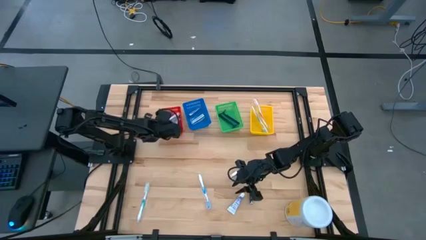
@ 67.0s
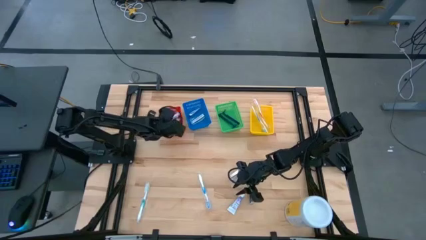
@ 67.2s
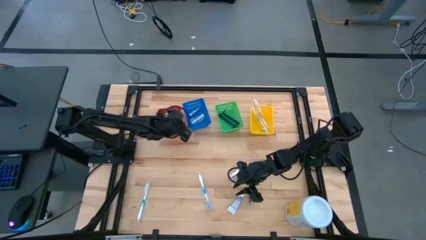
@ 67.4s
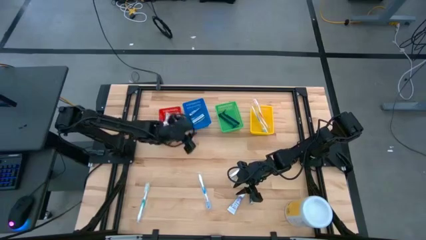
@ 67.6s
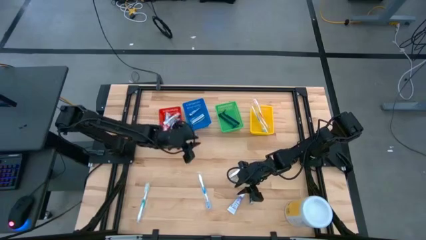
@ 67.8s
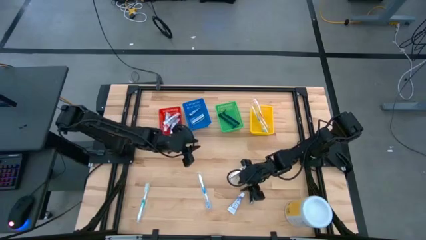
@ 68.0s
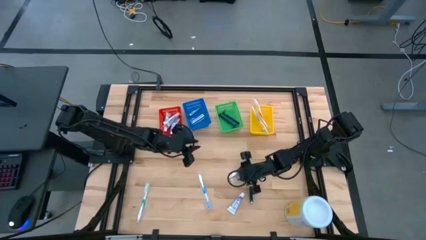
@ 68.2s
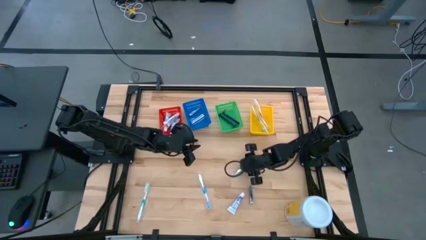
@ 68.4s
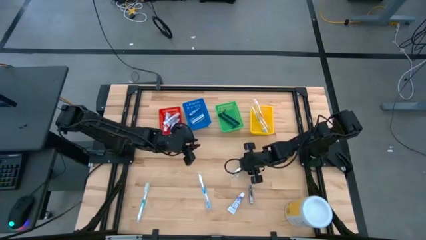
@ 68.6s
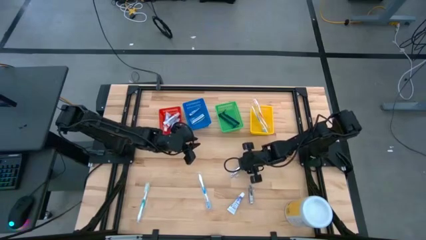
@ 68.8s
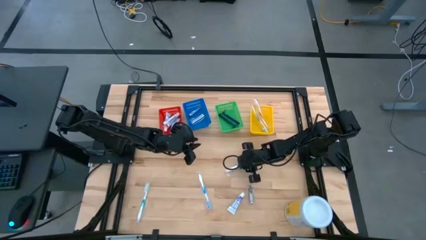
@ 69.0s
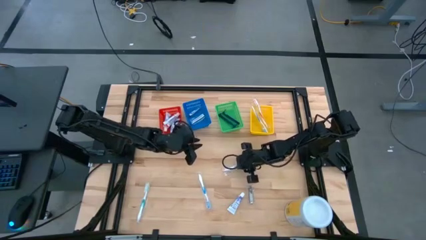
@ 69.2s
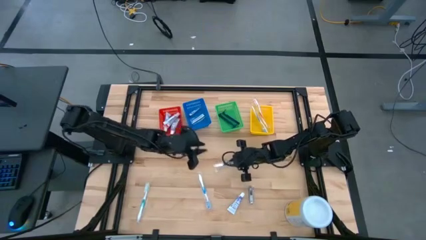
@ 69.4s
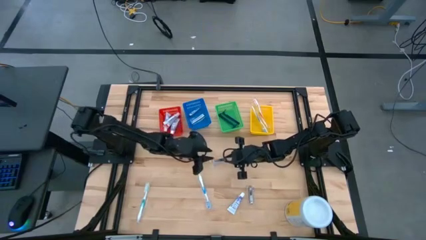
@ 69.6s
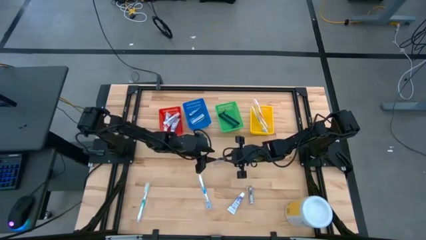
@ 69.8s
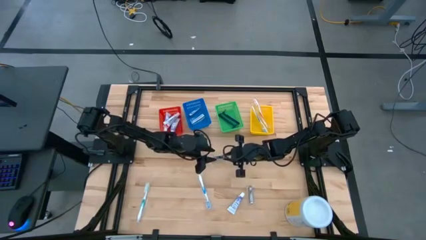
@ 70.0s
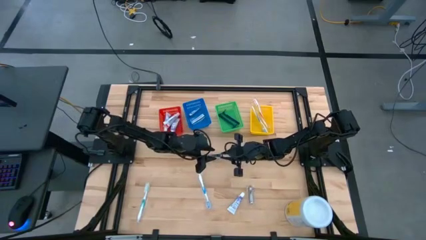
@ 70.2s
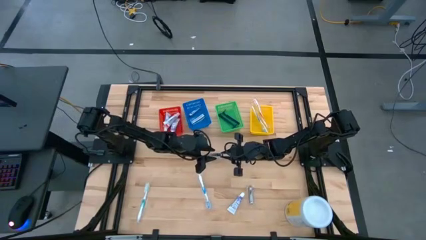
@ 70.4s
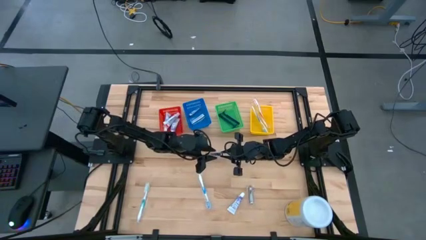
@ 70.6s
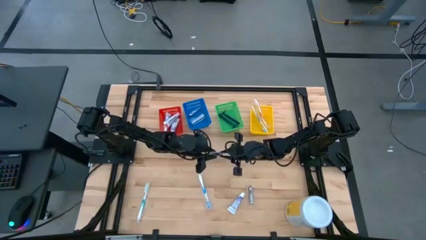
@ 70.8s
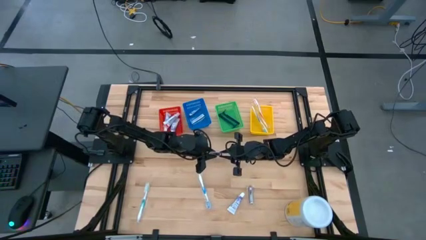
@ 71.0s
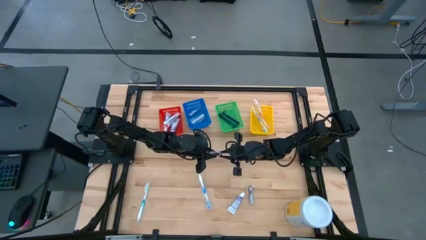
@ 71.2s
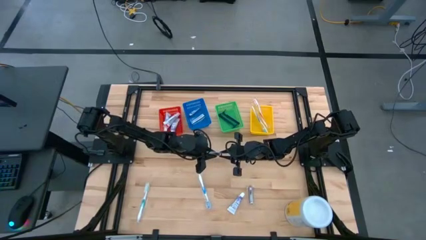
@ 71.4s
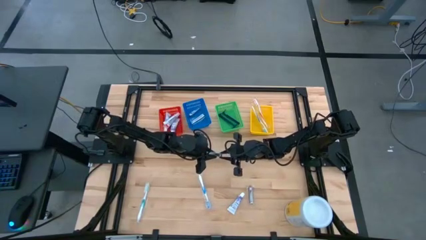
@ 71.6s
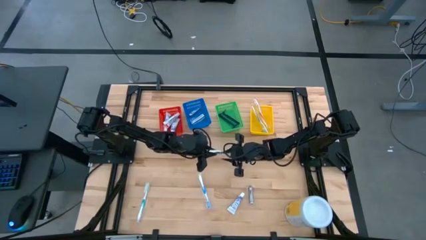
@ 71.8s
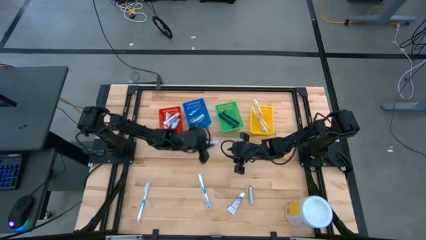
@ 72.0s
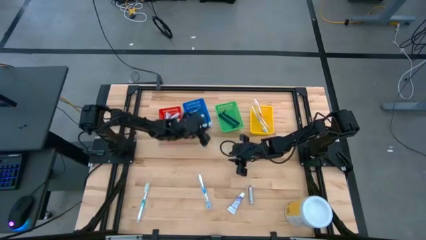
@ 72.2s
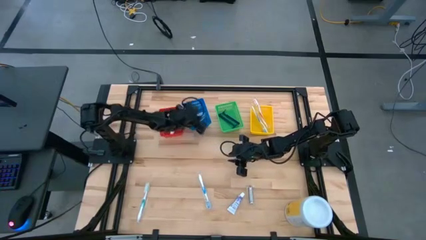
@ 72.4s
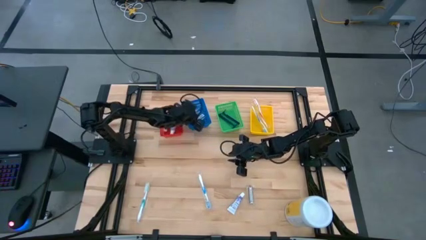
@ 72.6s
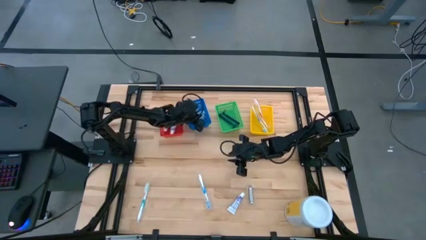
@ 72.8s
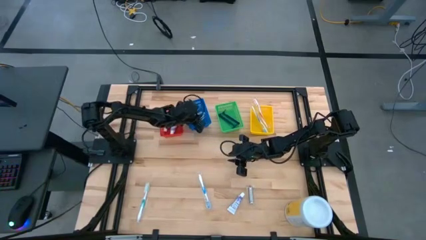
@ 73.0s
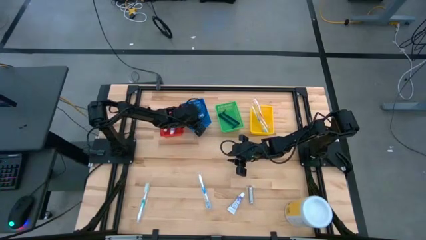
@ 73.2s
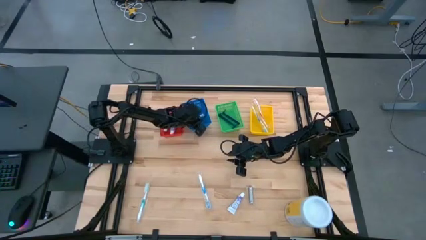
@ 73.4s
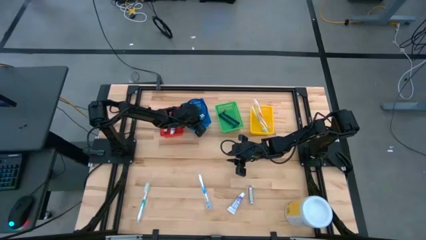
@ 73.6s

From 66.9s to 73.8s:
Task: Pick & Place Travel size toiletries
Put the nail cutter into the blue bin

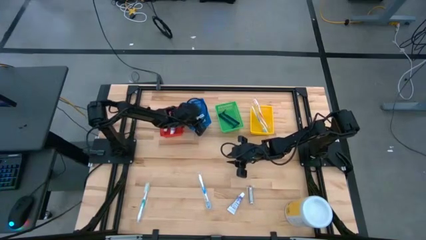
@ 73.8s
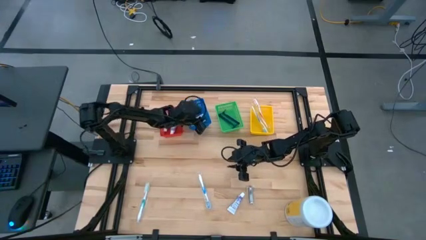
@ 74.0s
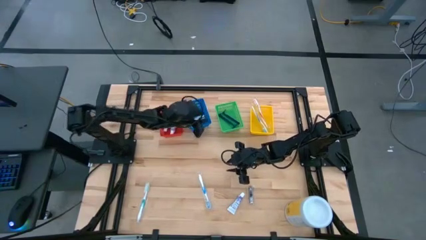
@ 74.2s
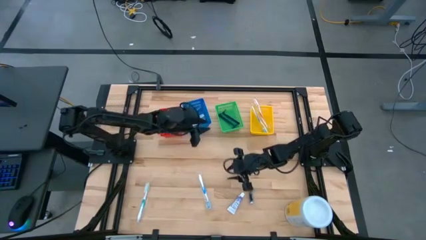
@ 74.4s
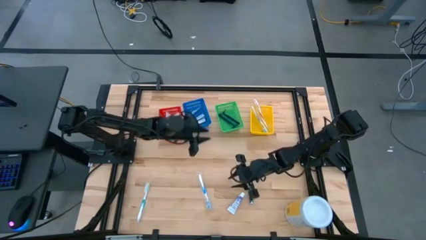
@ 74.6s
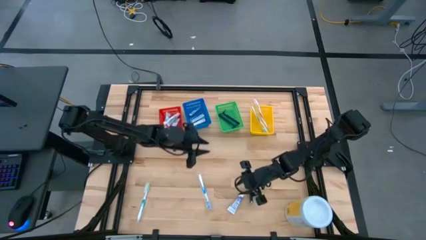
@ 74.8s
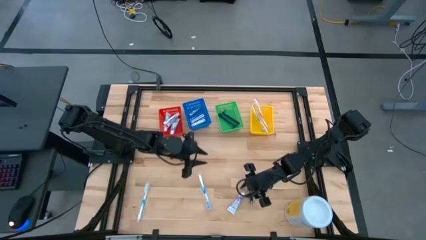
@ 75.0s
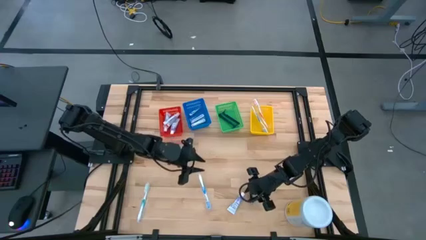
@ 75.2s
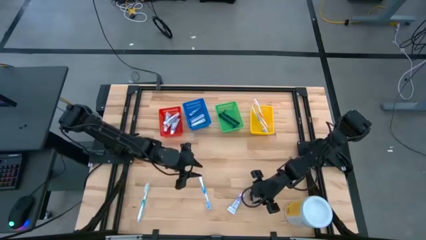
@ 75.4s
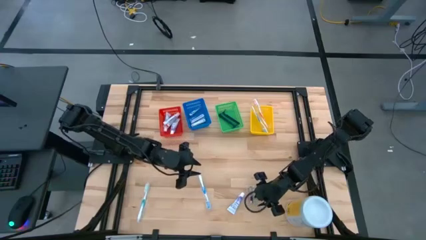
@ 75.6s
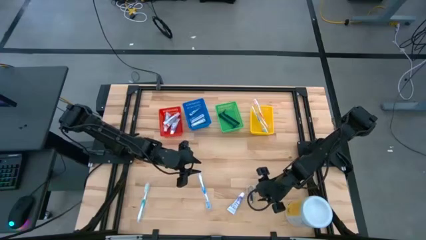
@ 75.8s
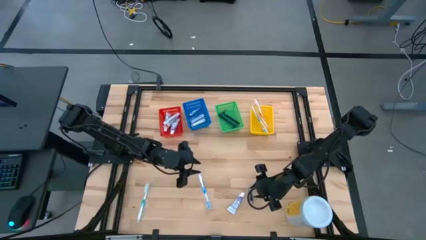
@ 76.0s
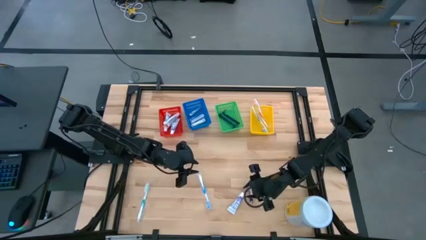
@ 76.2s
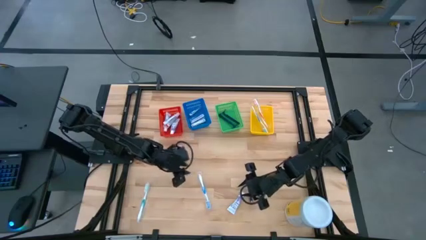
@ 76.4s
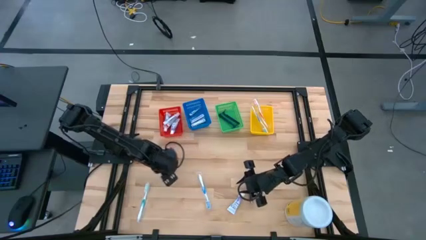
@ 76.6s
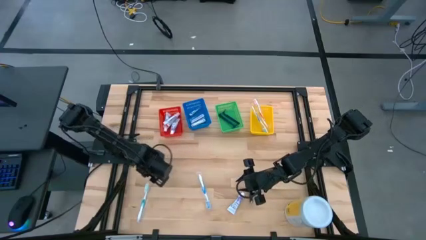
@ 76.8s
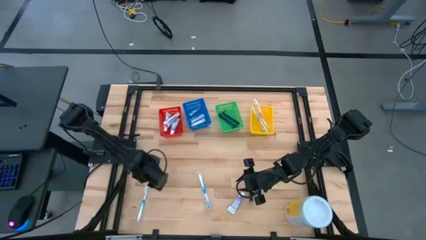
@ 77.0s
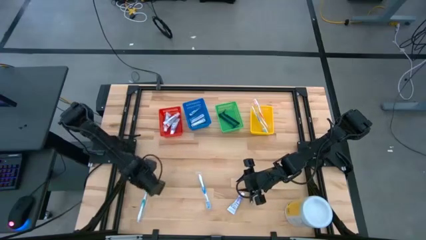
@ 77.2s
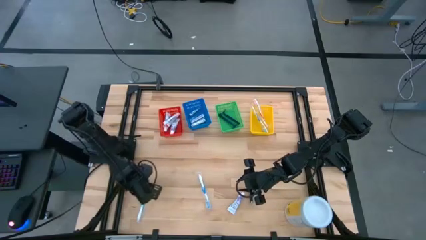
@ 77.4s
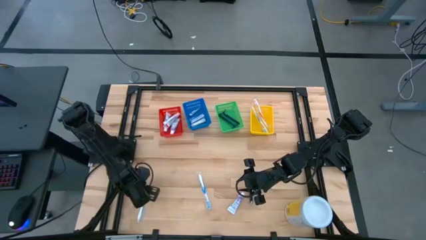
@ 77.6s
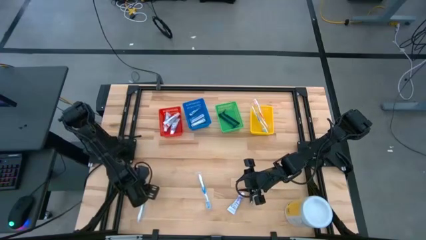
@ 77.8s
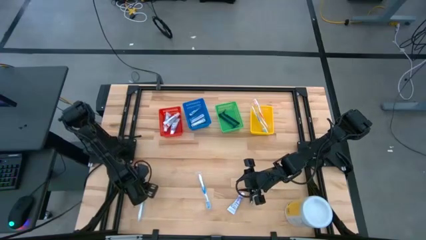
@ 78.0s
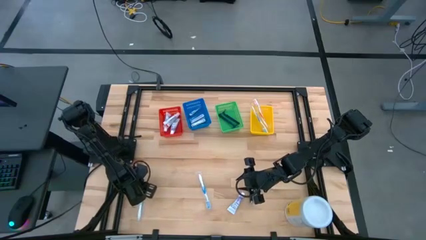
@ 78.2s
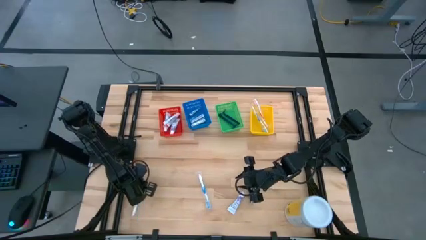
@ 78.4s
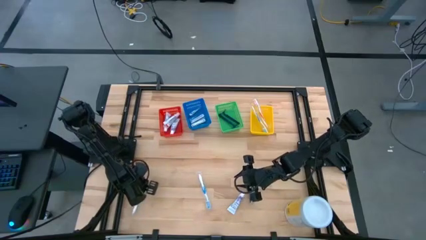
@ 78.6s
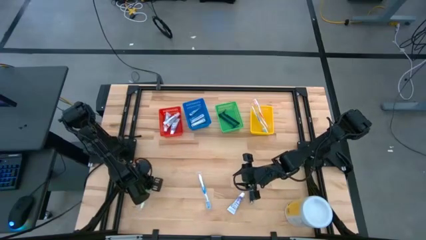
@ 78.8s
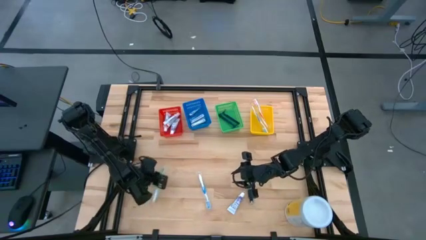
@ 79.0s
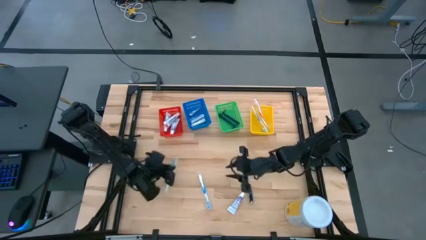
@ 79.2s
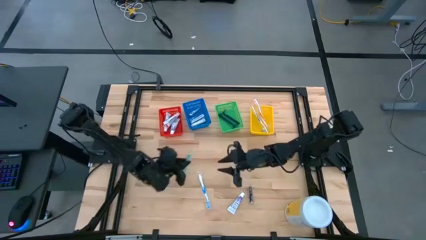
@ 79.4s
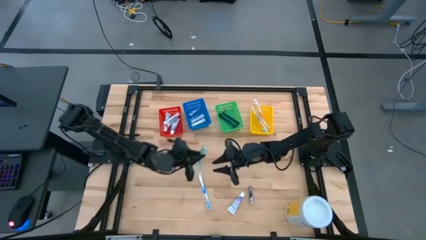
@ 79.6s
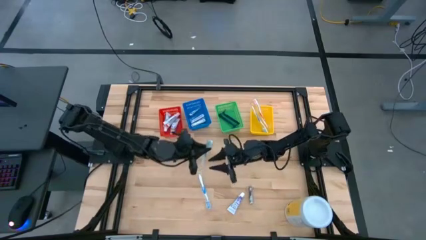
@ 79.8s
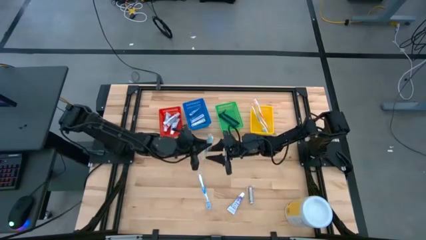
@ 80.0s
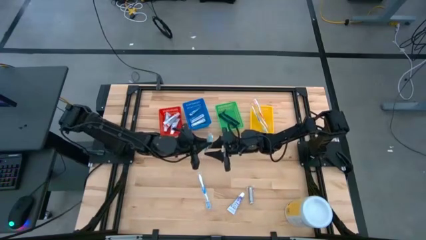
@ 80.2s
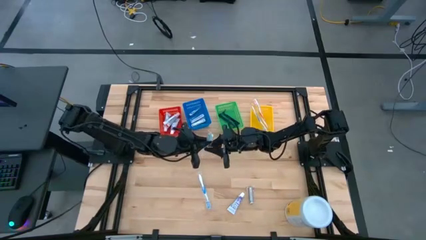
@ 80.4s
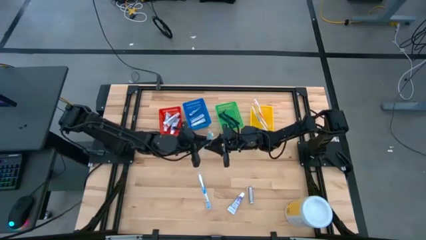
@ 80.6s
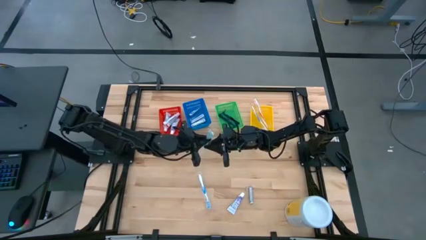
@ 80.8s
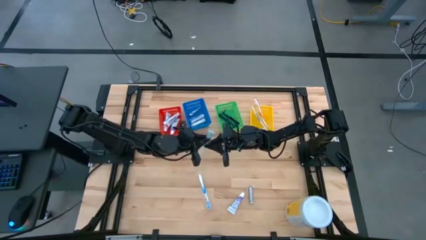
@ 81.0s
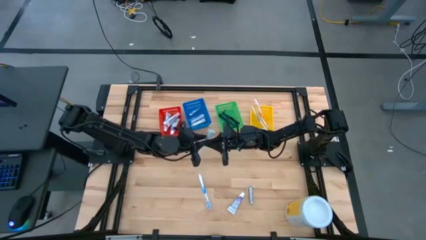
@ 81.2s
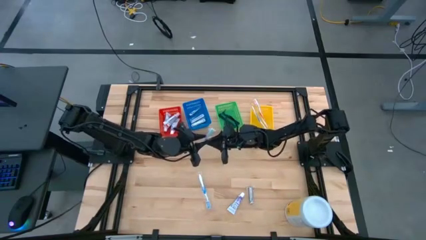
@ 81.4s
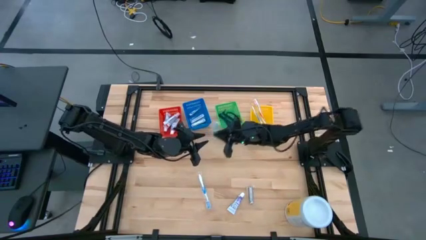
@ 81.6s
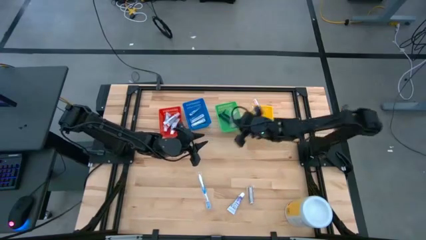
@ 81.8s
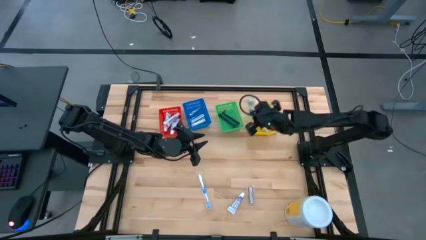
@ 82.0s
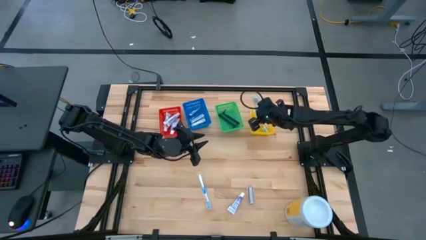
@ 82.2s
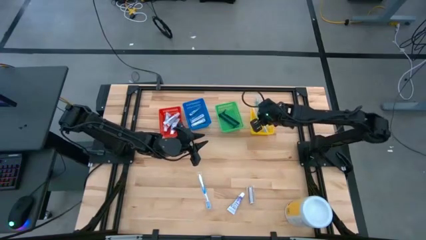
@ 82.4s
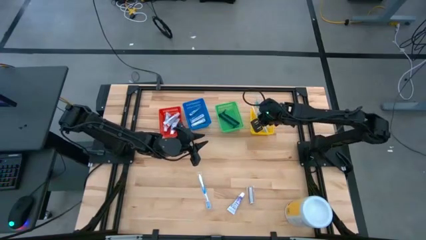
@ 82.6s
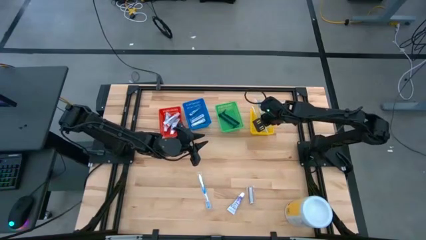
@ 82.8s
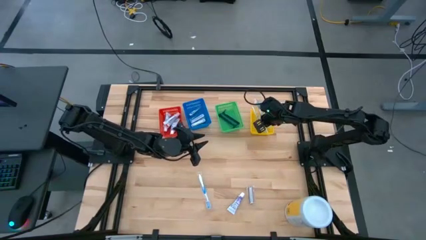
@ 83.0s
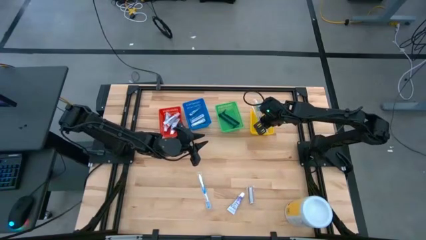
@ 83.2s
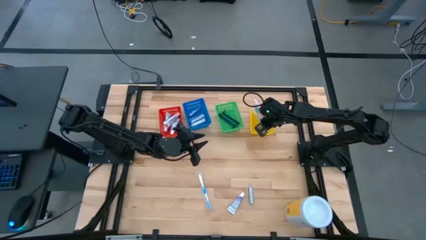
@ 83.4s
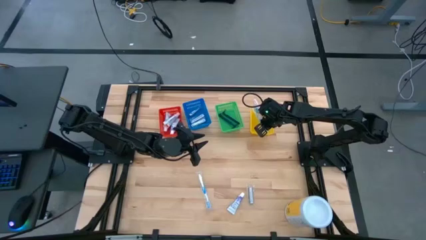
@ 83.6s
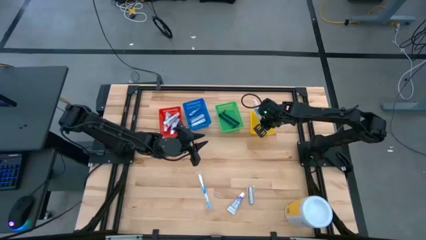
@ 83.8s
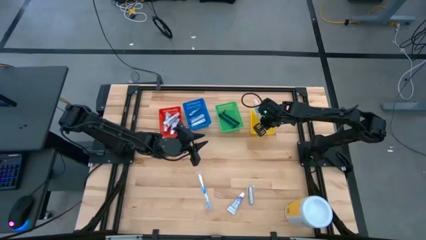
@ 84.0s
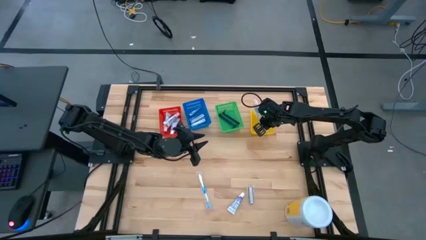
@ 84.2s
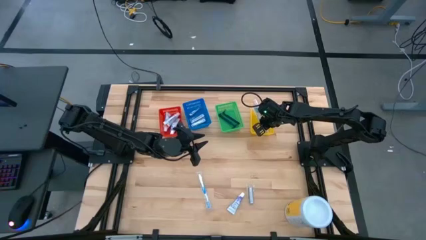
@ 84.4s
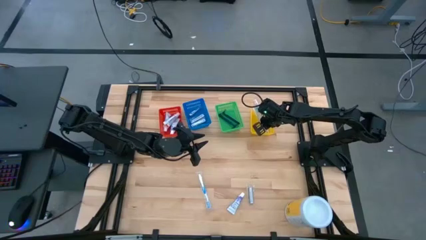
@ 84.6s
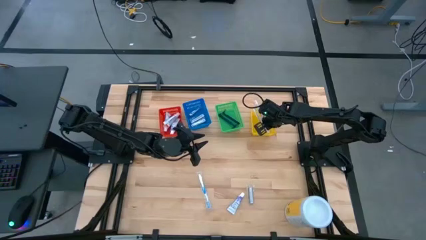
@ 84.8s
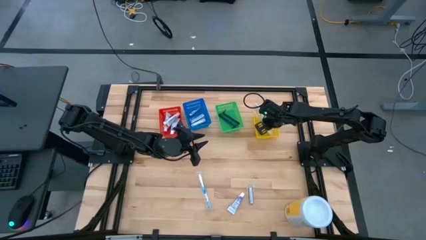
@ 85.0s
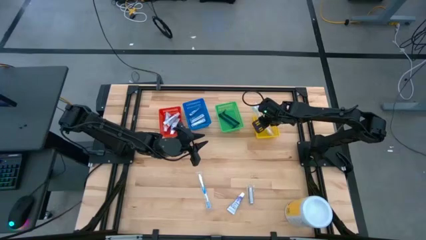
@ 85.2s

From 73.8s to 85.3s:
Put the green toothbrush into the yellow bin
